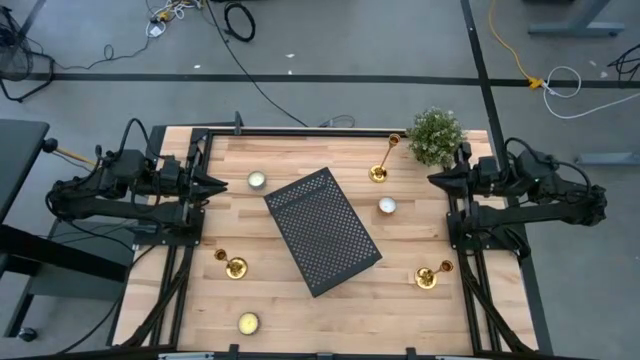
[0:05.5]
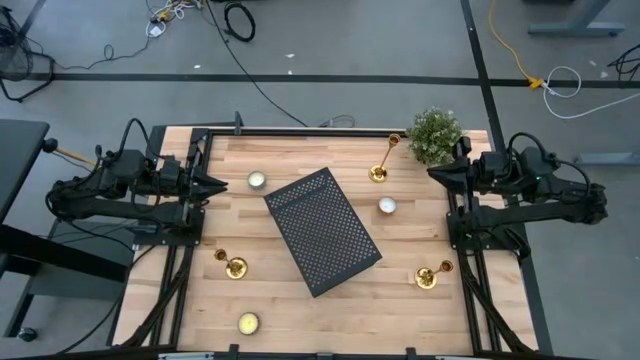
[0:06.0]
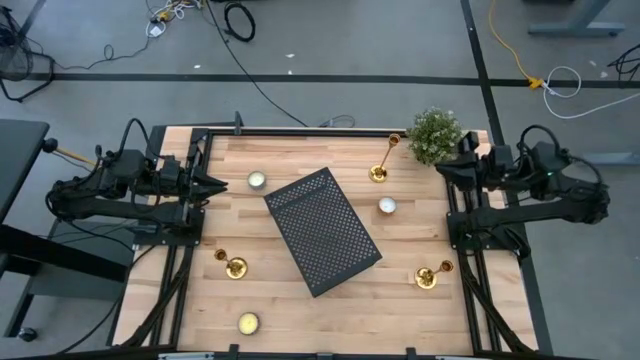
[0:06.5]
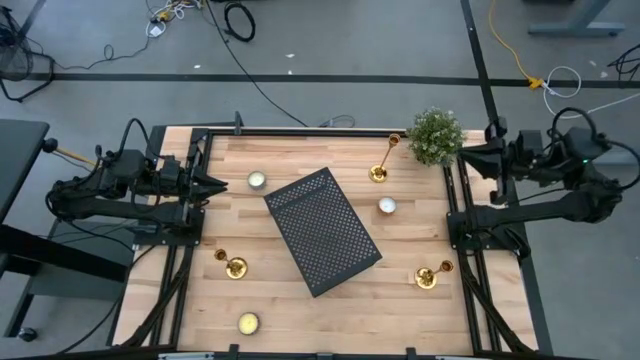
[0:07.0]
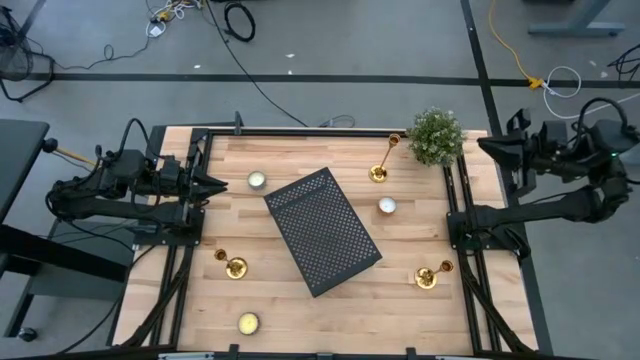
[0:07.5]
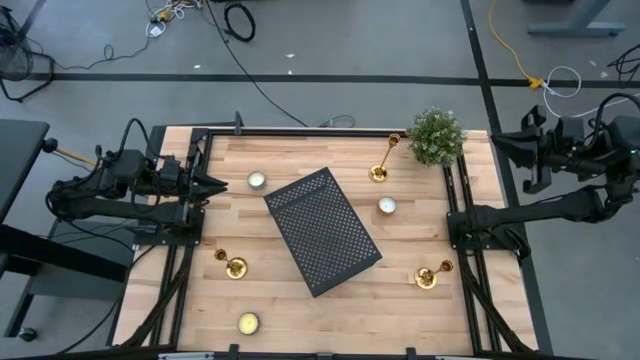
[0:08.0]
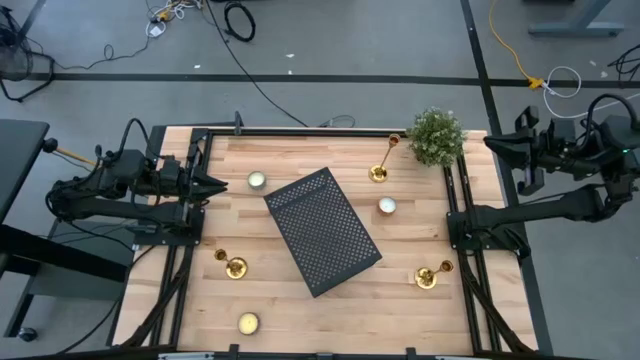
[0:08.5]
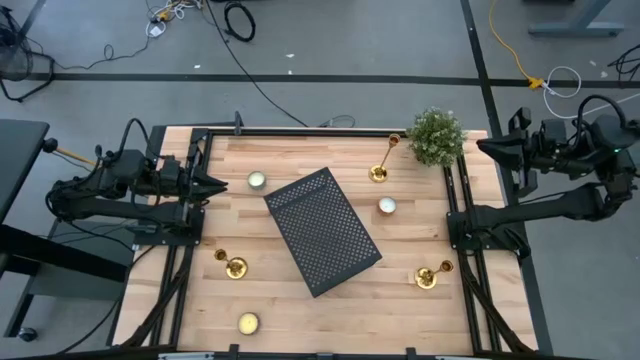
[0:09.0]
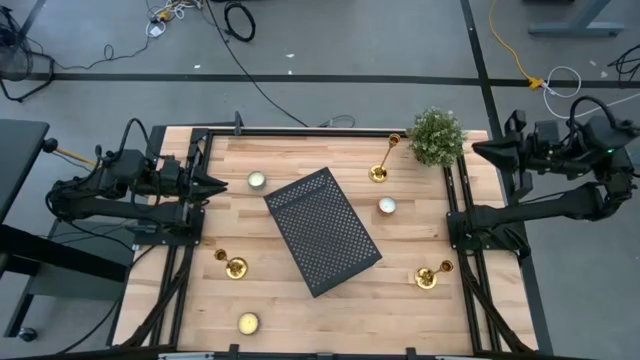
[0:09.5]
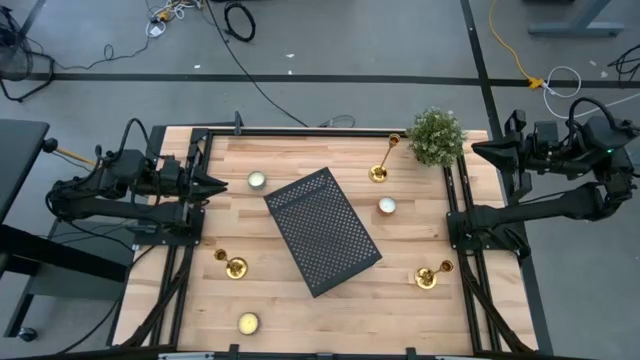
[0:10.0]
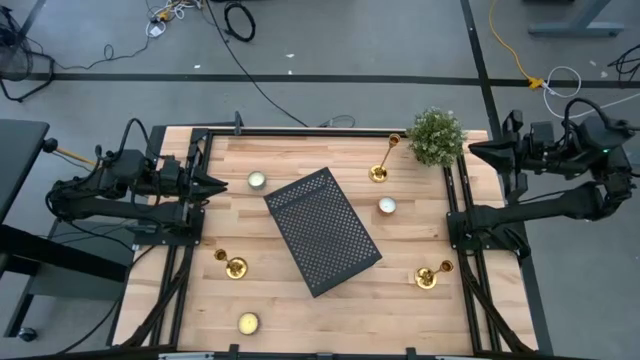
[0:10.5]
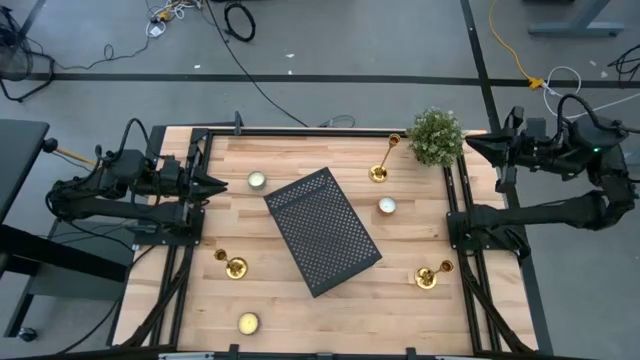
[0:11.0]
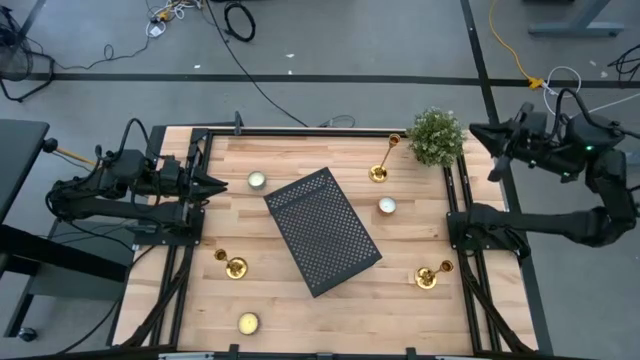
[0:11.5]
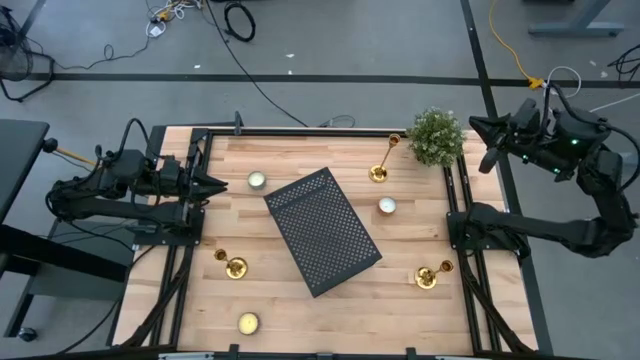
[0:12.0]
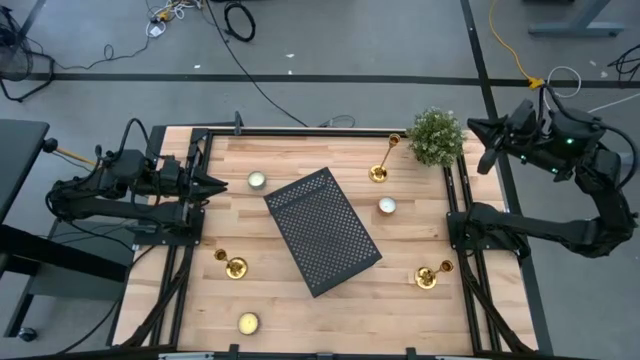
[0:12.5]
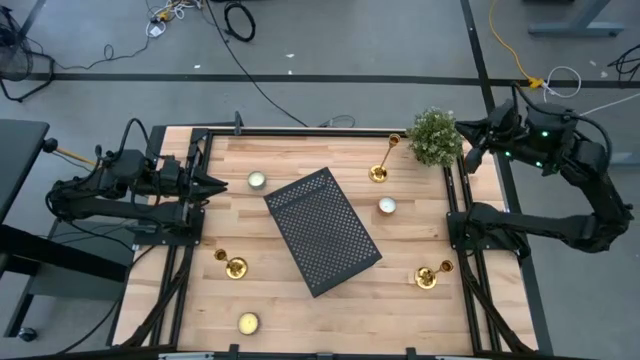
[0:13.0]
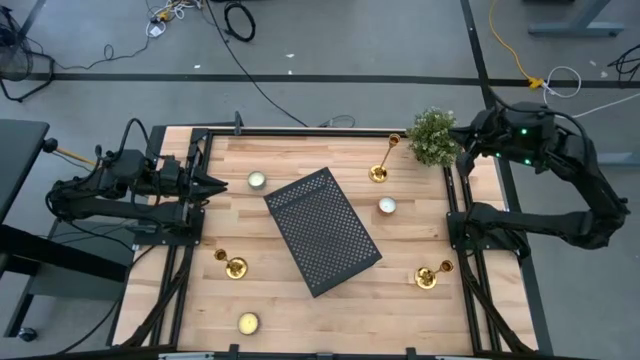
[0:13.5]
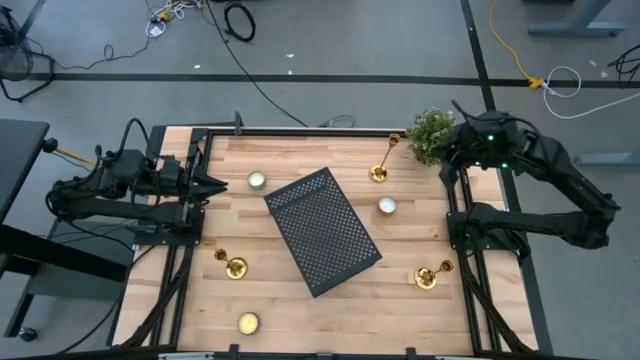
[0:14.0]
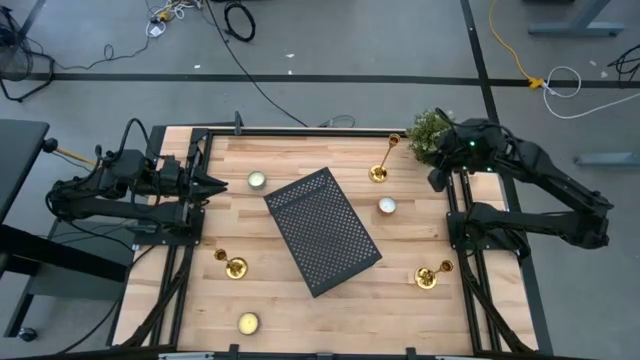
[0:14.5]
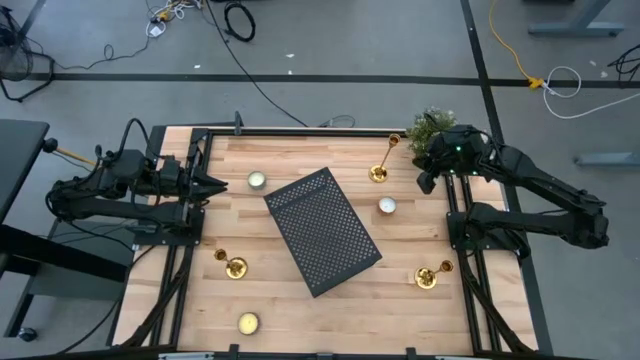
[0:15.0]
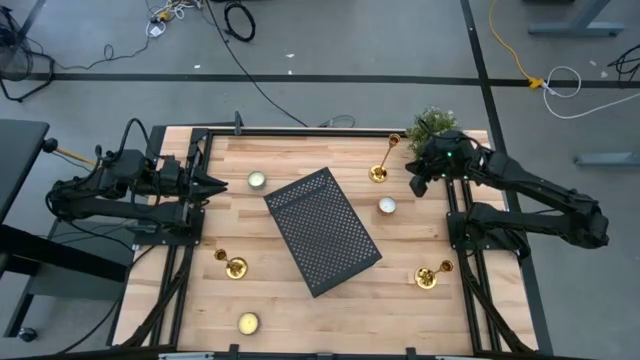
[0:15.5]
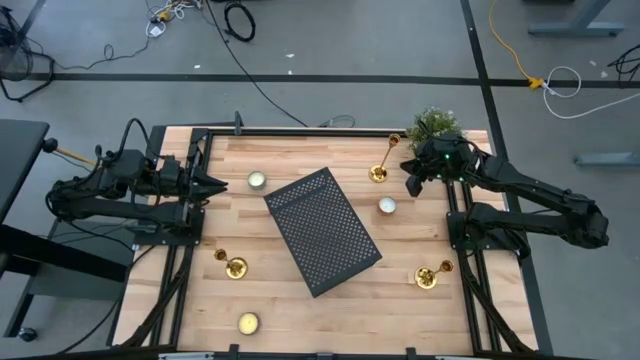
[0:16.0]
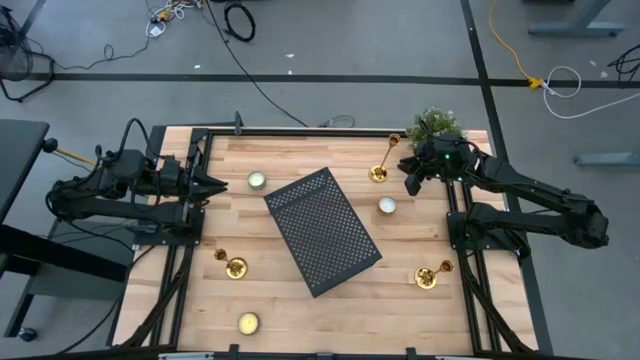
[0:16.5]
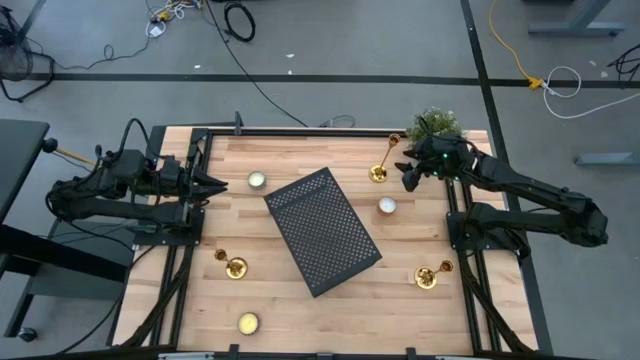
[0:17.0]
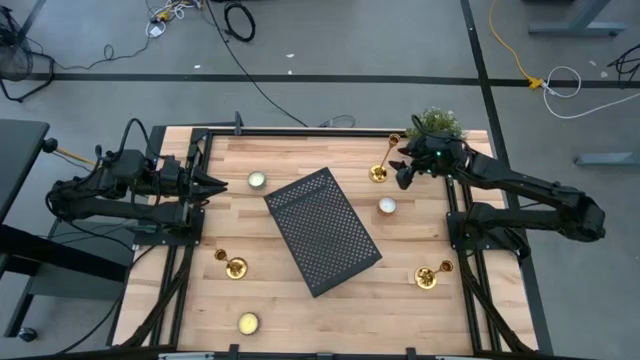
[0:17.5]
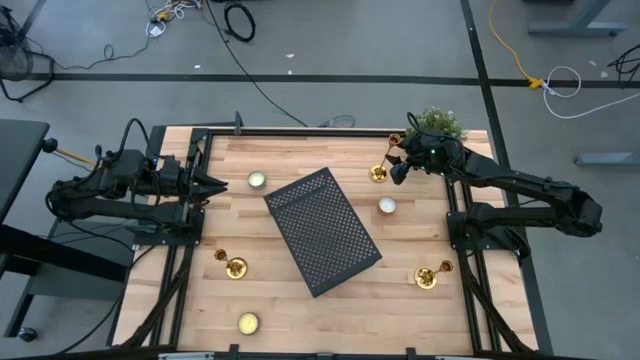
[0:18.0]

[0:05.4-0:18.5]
Task: Pick & Place candle stick holders
Put the top gold candle holder on the shelf

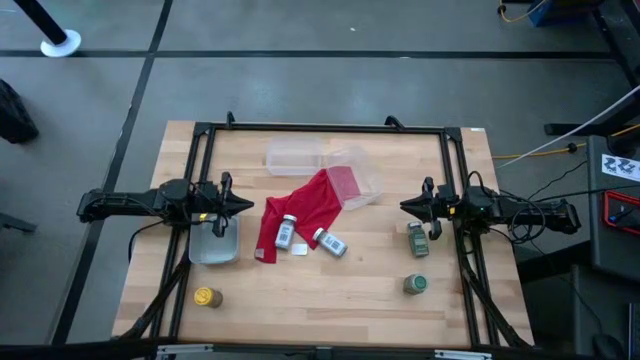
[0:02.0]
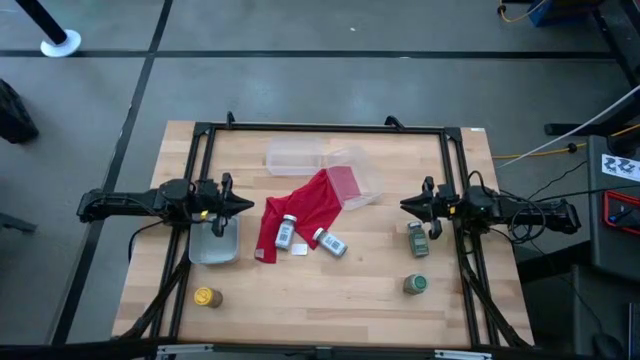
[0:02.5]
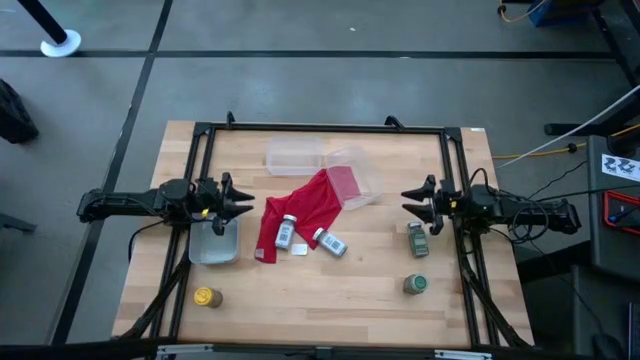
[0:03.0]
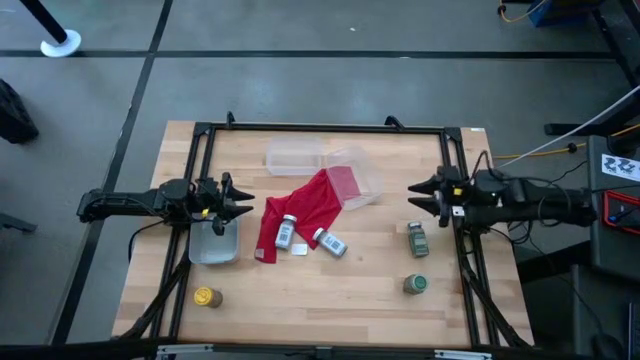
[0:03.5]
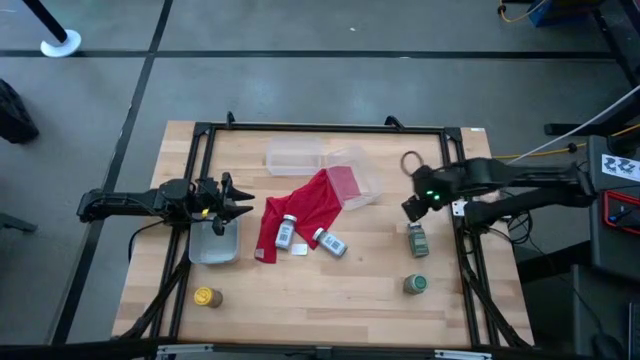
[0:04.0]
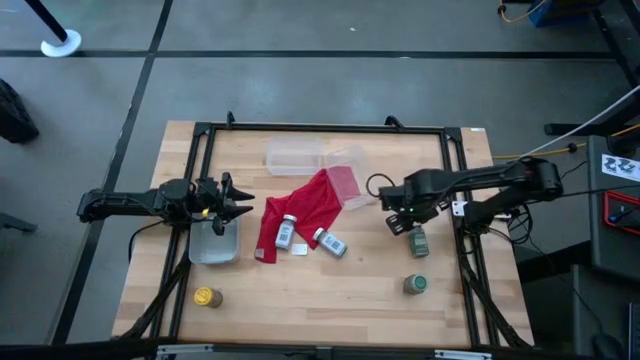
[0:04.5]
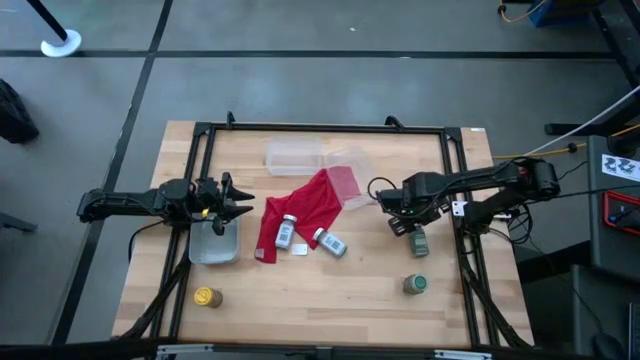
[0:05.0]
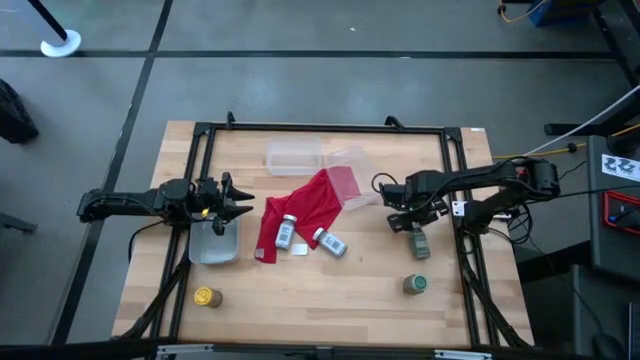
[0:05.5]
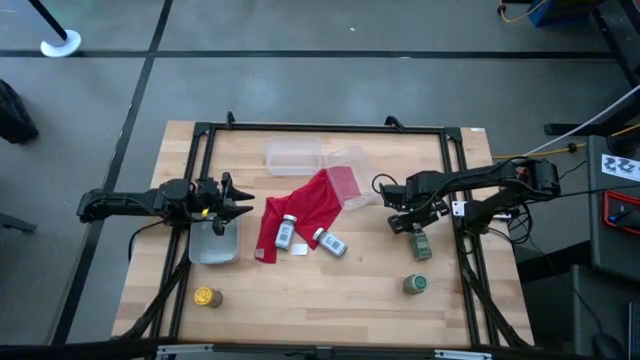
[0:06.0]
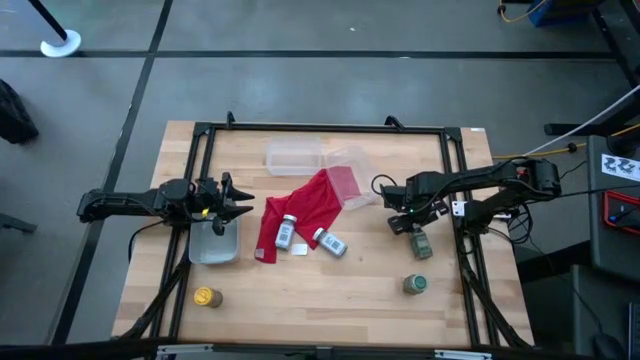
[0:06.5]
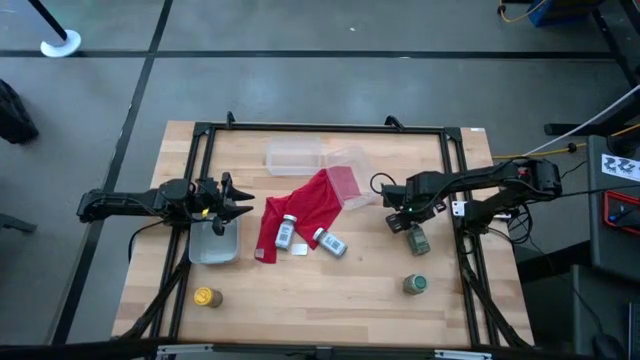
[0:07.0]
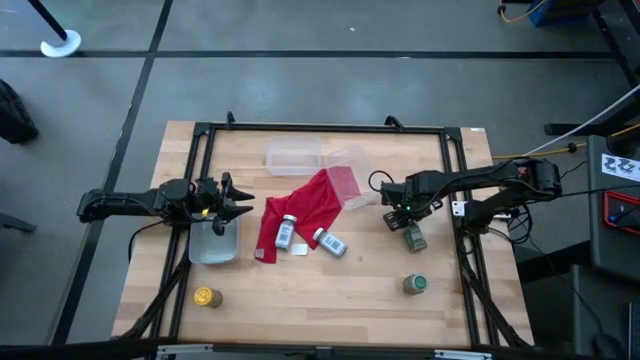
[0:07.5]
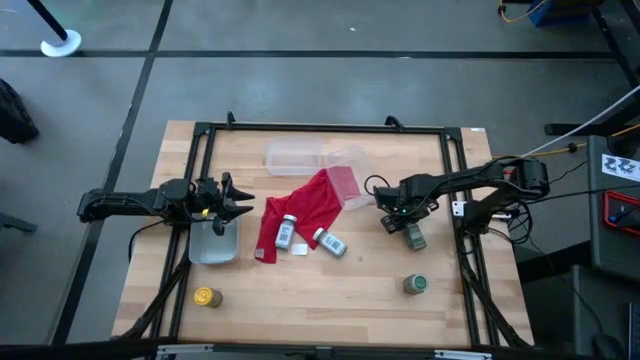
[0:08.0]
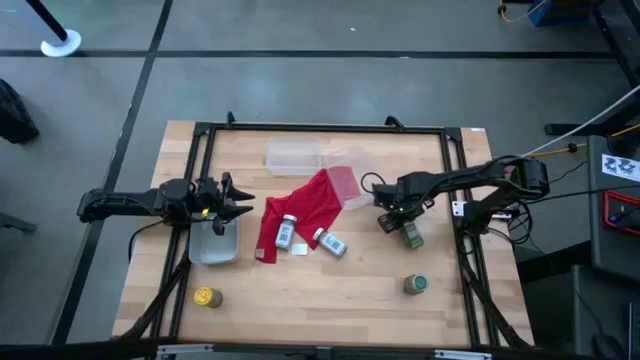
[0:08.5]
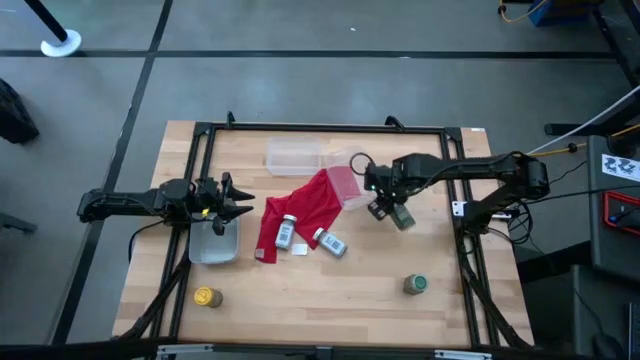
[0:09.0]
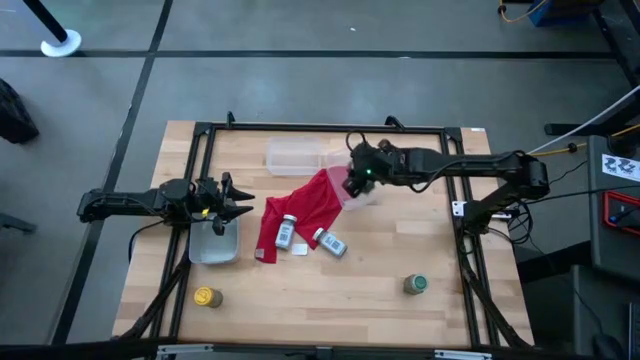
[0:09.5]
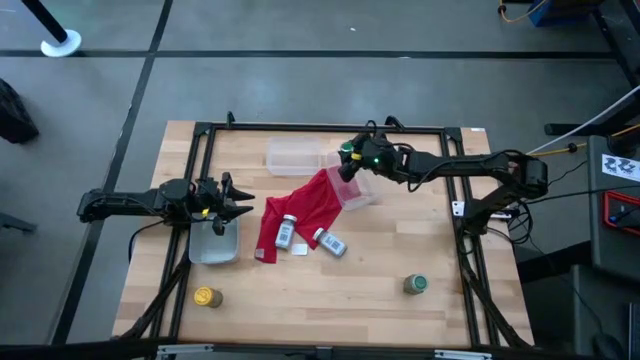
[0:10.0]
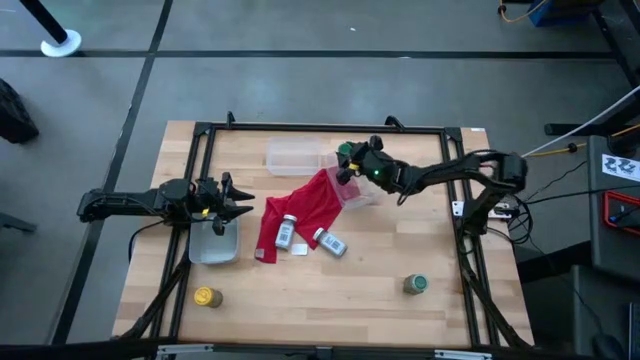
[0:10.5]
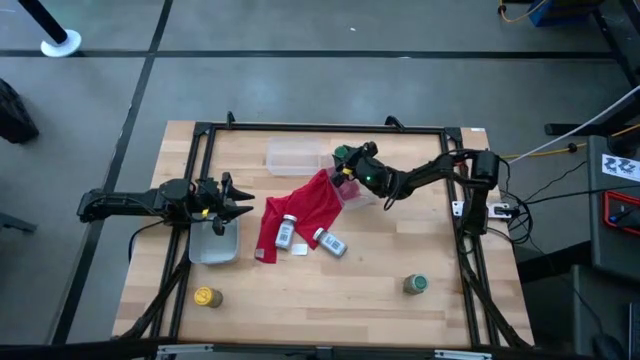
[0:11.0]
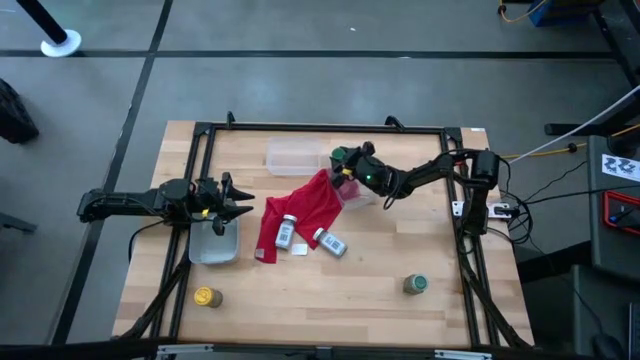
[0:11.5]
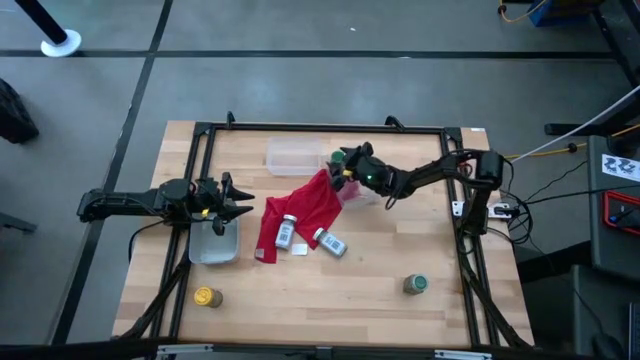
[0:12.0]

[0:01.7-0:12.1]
Task: Sort spices by type
Put the top green seasoning bottle into the right transparent bin
